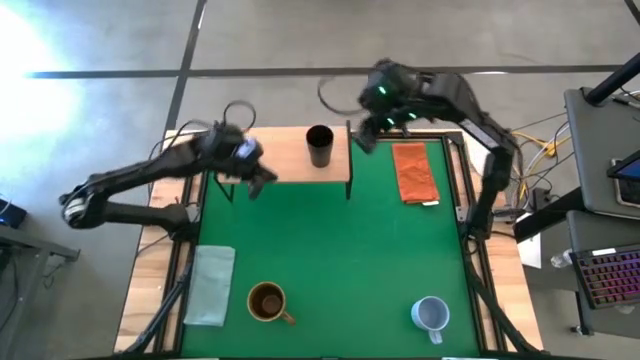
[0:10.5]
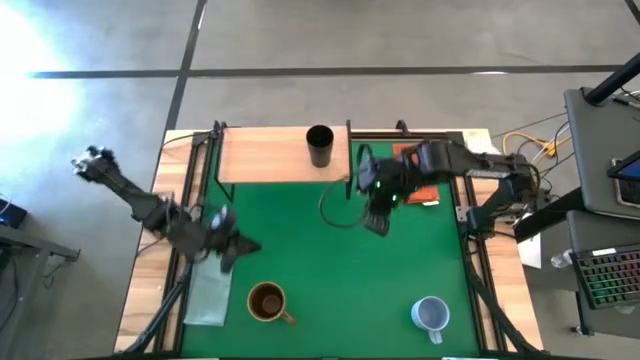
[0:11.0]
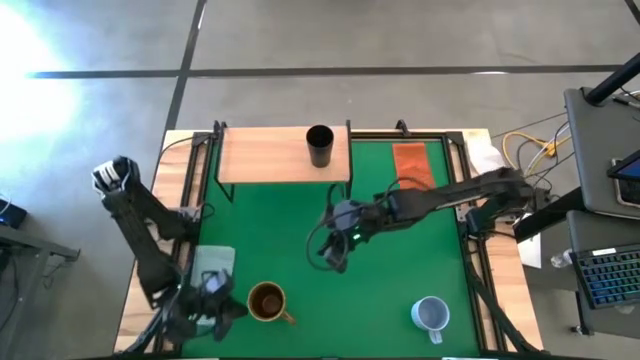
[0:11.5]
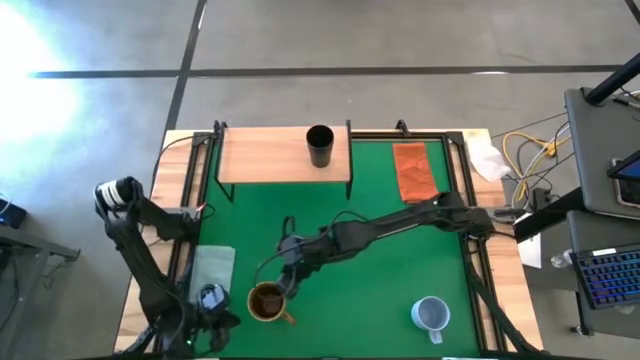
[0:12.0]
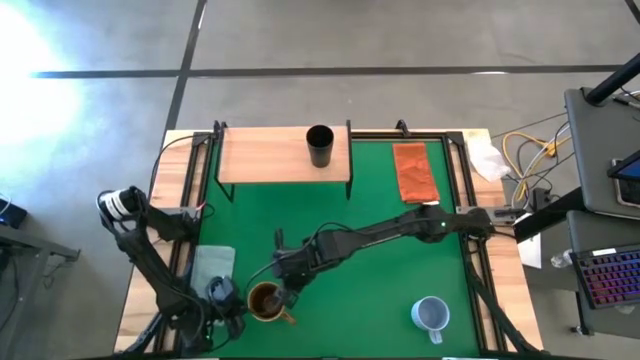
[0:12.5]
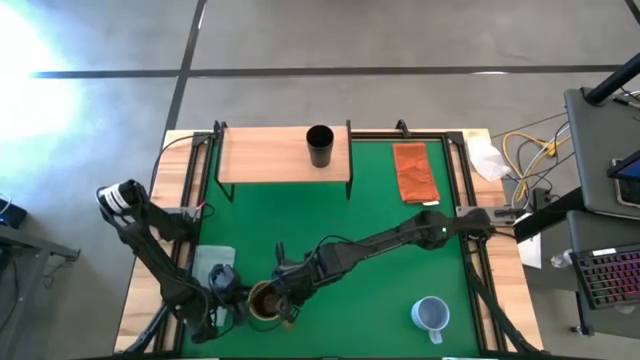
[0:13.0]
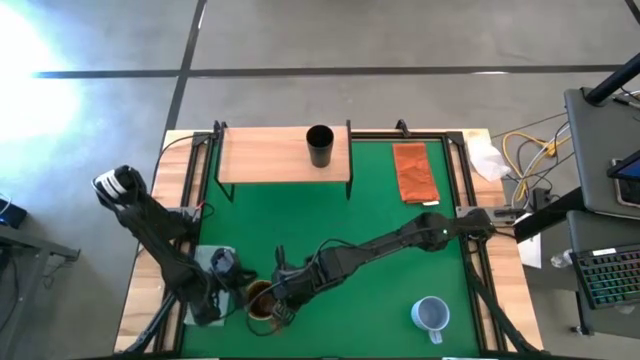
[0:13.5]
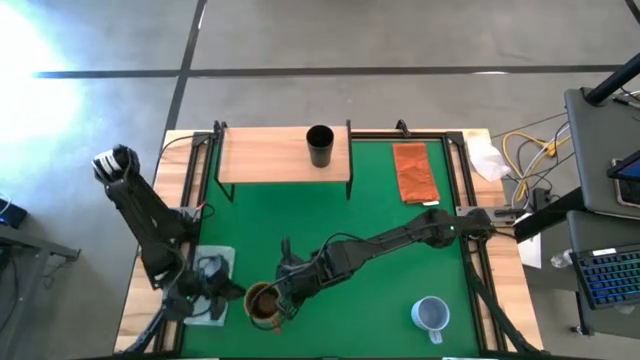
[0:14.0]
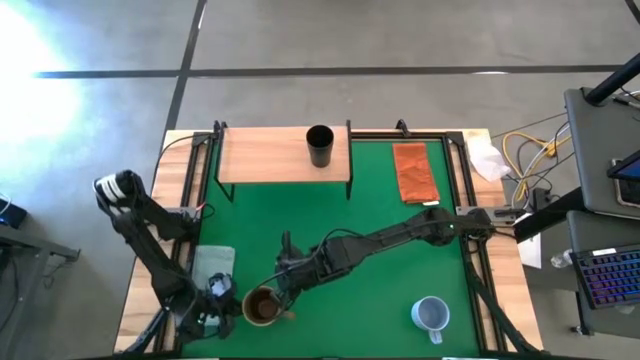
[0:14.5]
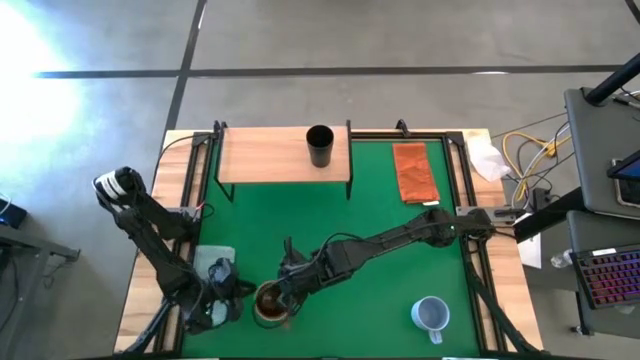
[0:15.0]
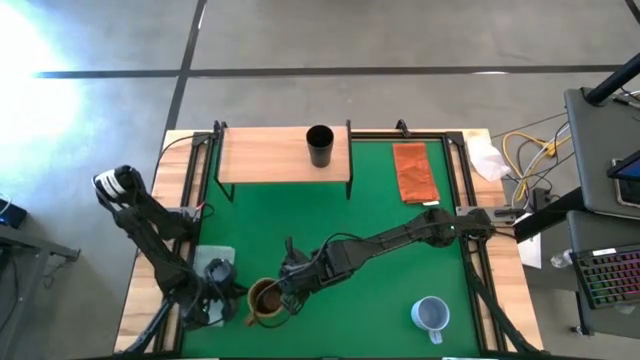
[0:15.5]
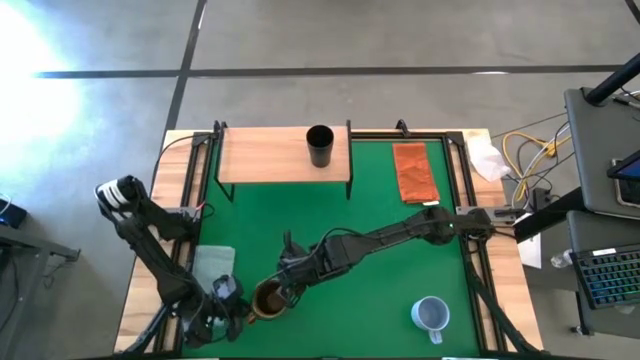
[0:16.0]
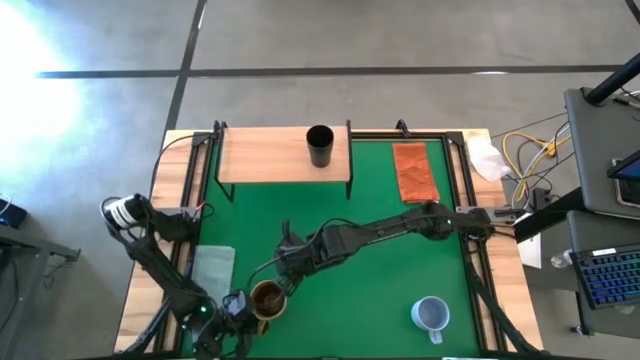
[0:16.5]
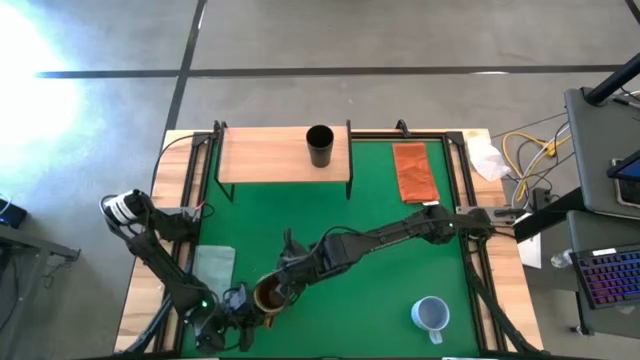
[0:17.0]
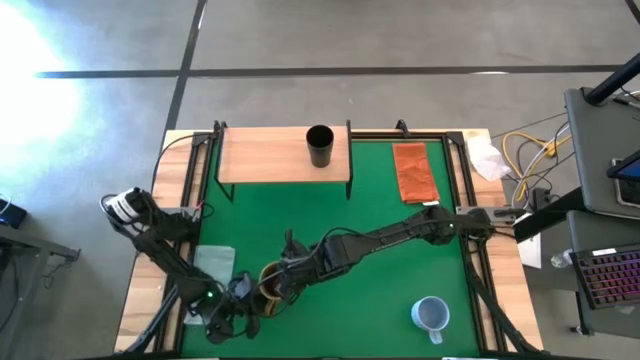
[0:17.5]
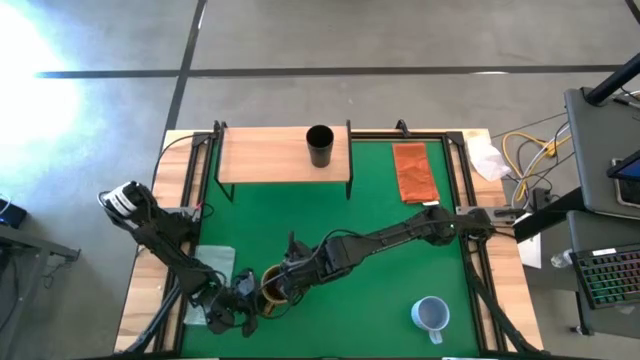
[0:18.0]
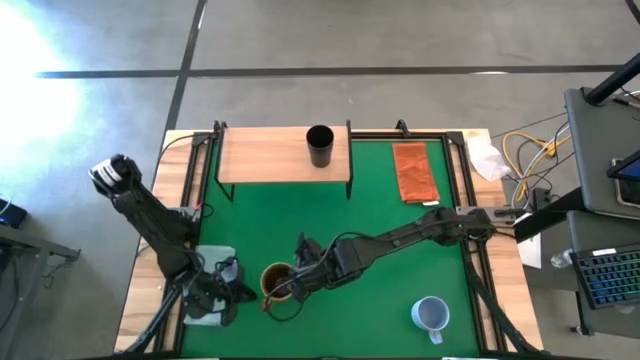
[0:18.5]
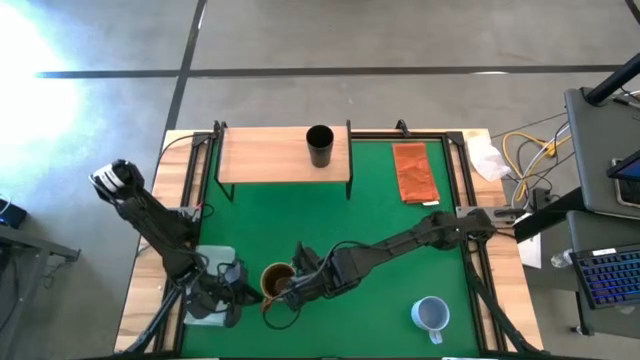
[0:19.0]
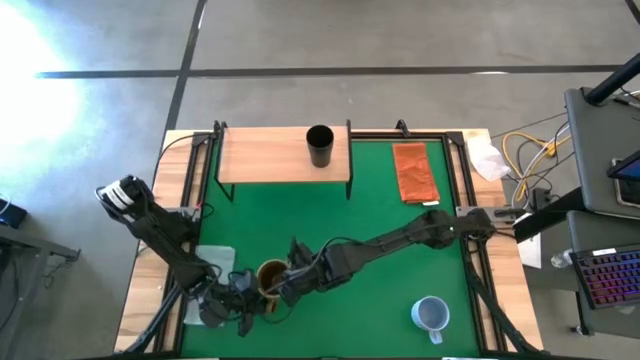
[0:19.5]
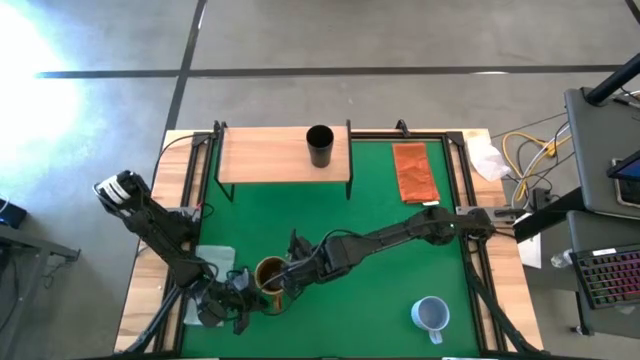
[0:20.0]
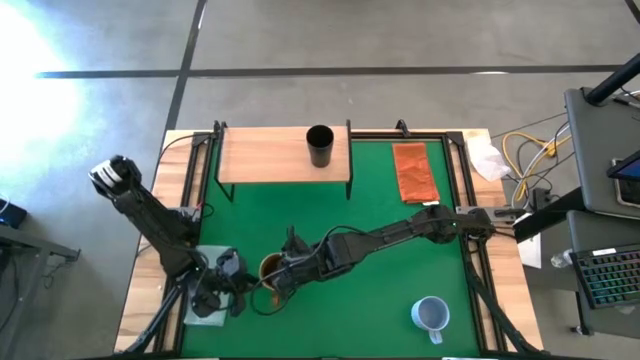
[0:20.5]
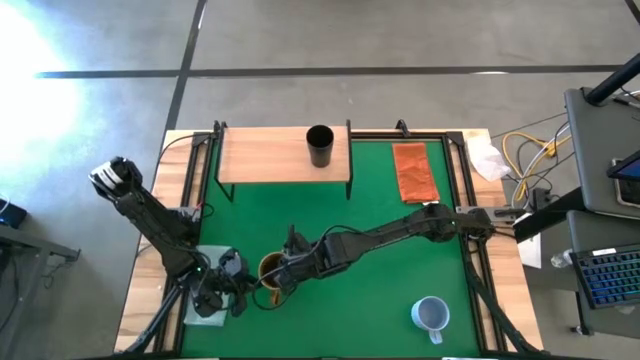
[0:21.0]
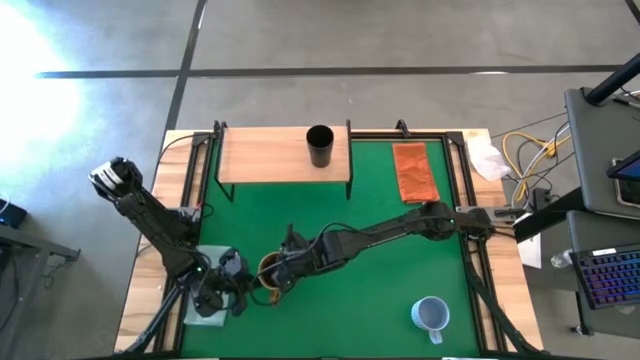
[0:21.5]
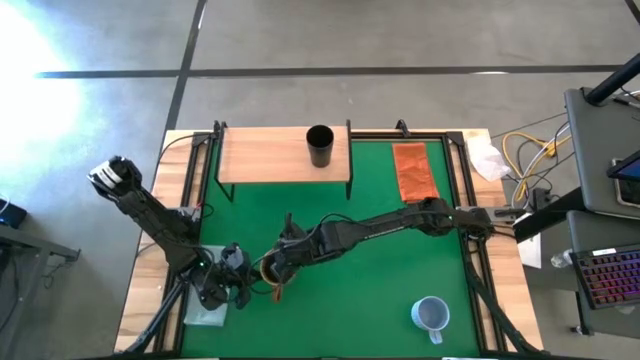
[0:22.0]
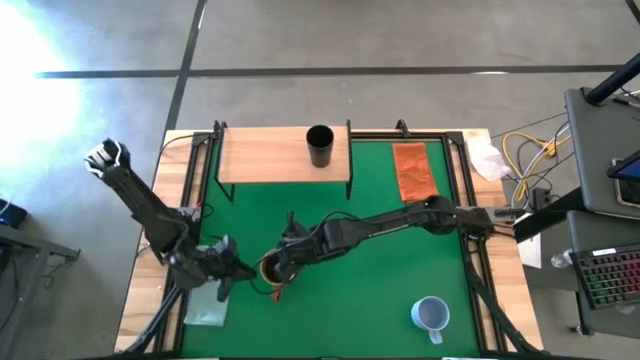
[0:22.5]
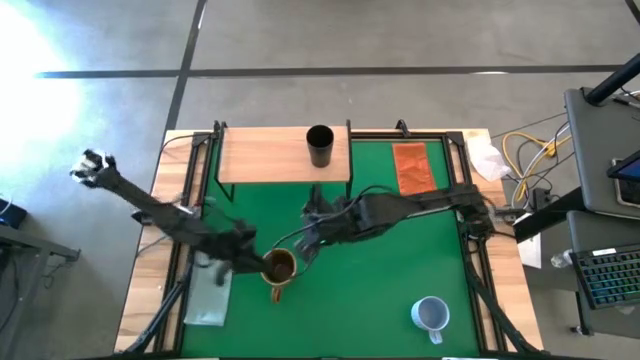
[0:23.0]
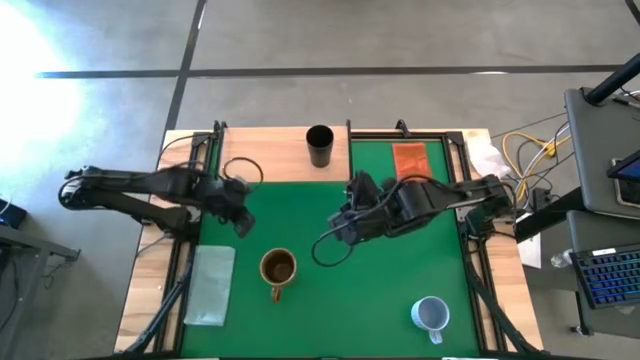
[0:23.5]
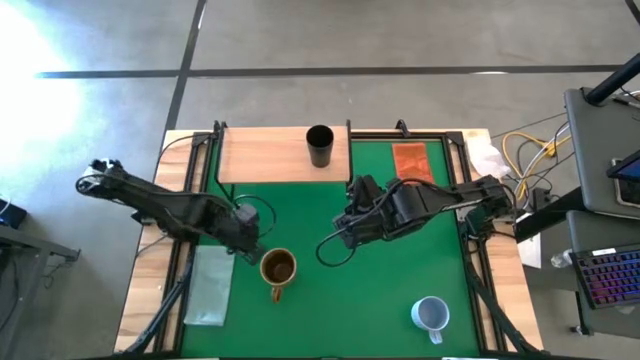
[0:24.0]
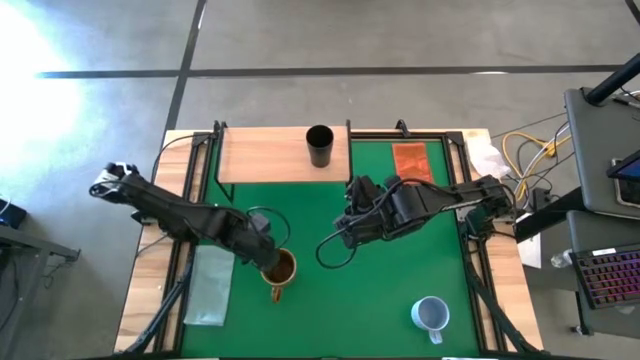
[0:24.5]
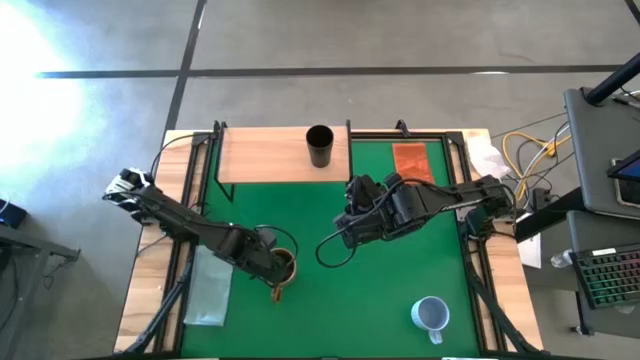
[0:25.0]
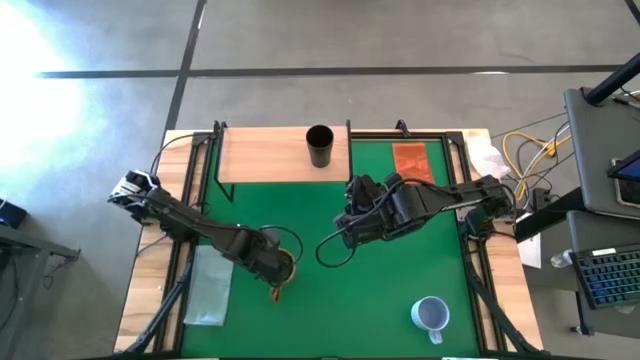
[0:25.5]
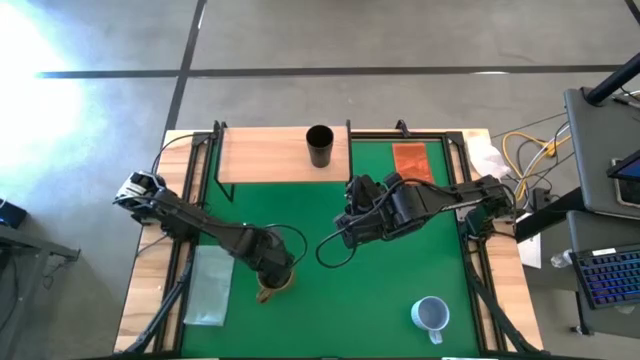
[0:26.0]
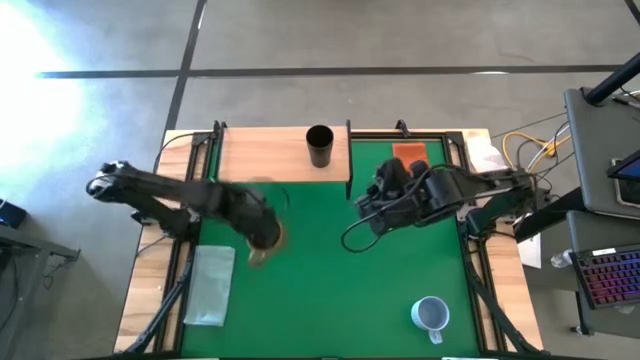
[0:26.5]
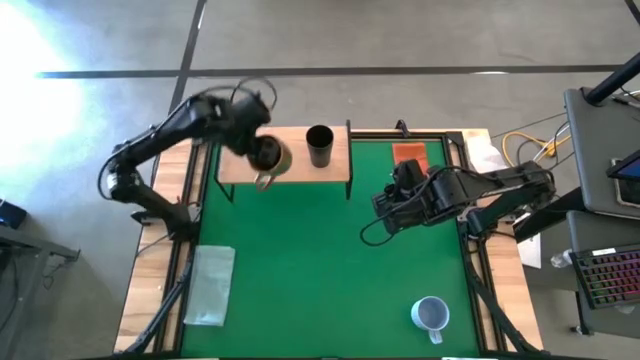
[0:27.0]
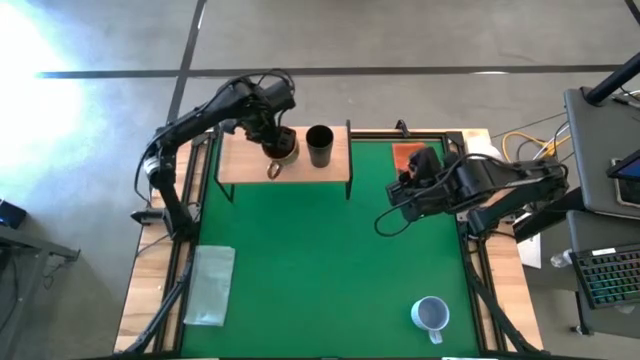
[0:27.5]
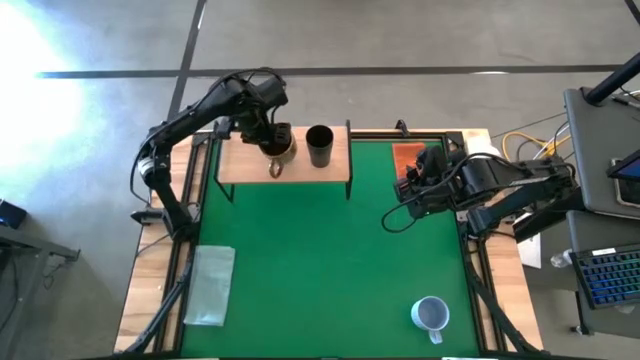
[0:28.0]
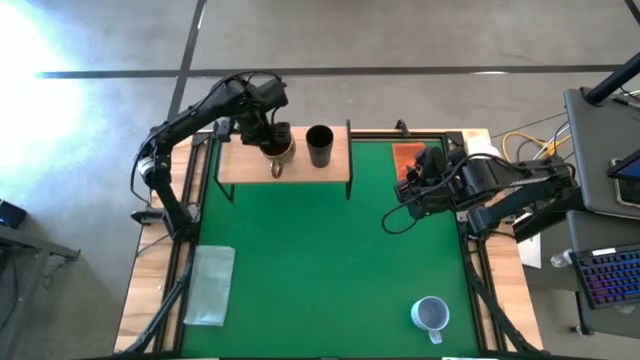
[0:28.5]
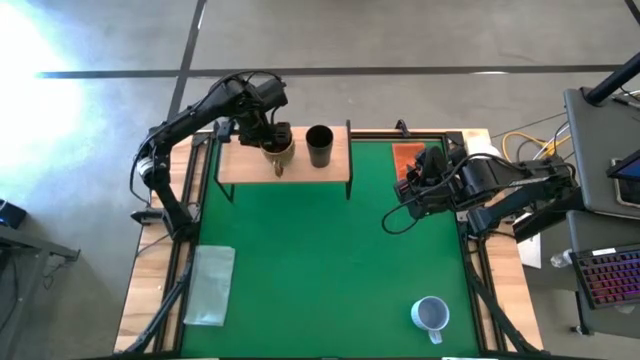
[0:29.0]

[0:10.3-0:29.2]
Task: Stack small to large cups/mugs on shelf
Put the patterned brown mug on the shelf

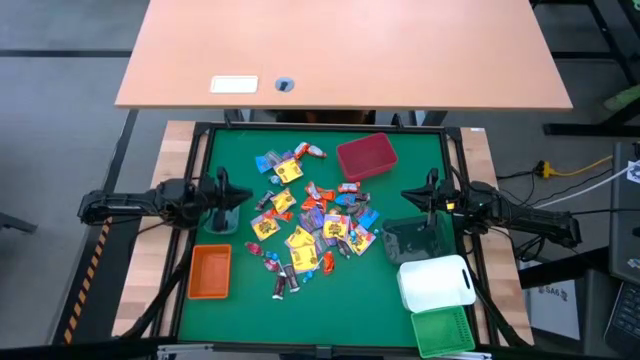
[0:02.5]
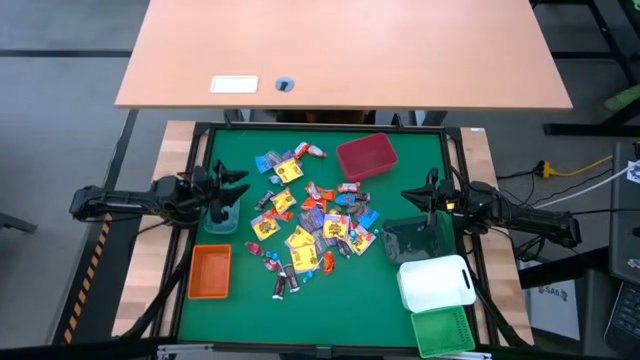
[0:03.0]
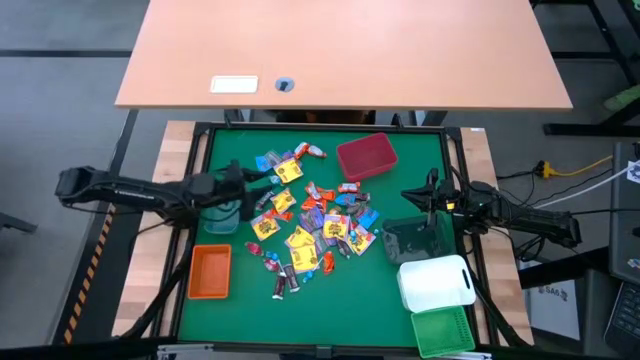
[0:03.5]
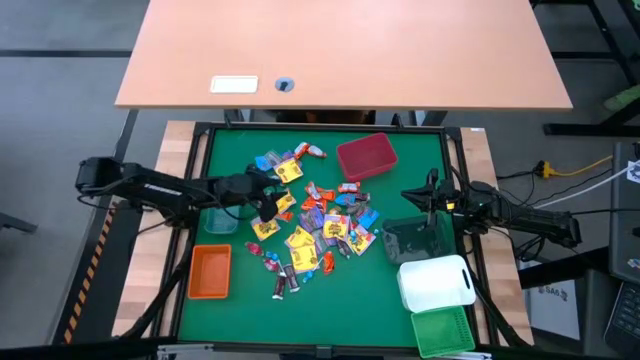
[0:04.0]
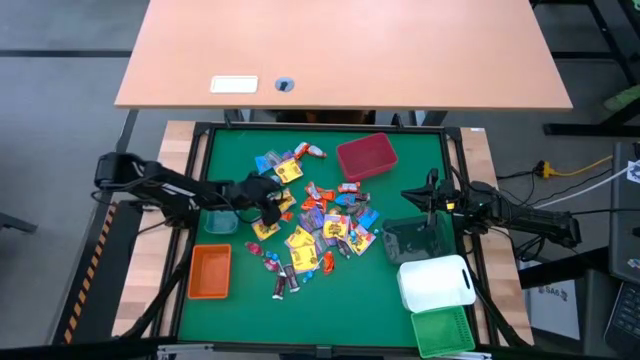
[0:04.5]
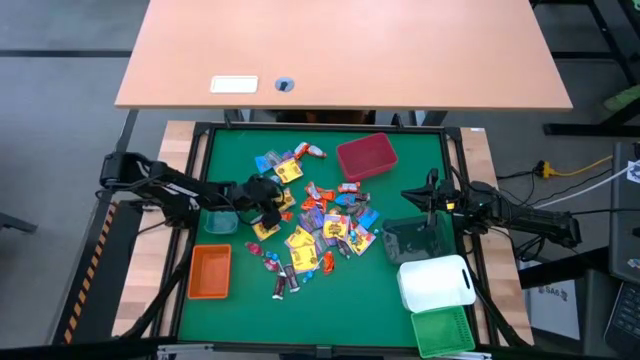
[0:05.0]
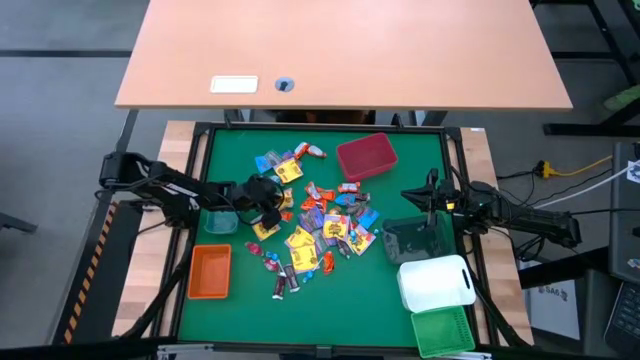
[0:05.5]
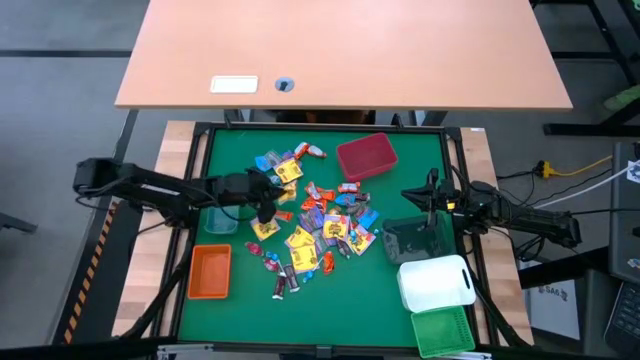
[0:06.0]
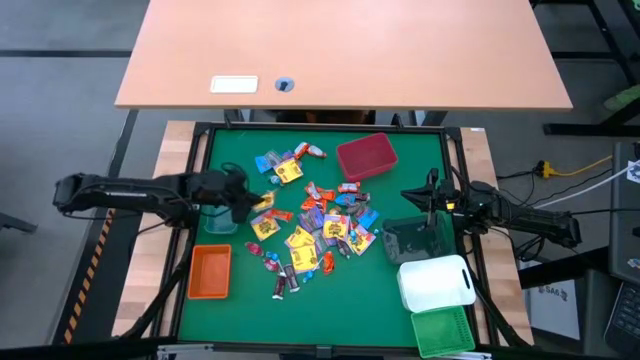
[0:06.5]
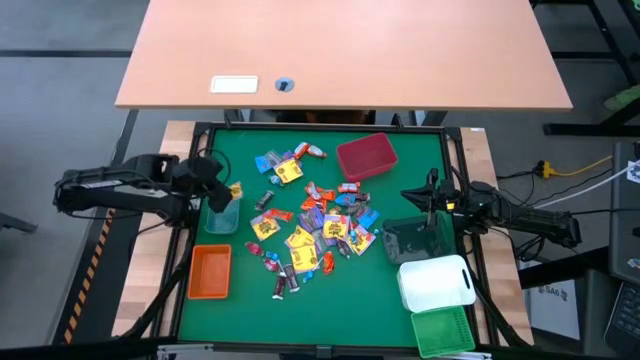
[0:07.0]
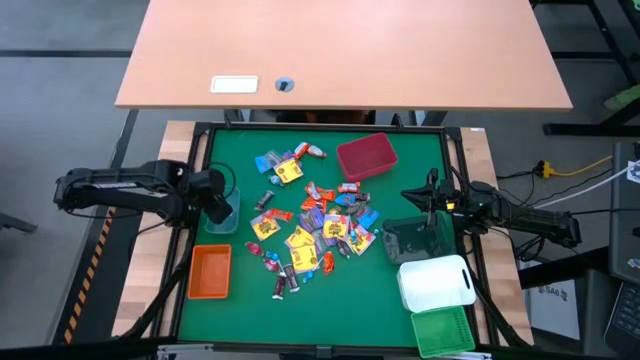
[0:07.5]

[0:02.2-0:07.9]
Task: Sort candy
Put the yellow candy into the blue bin
